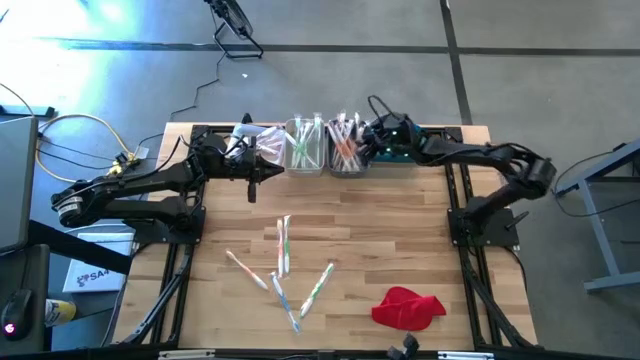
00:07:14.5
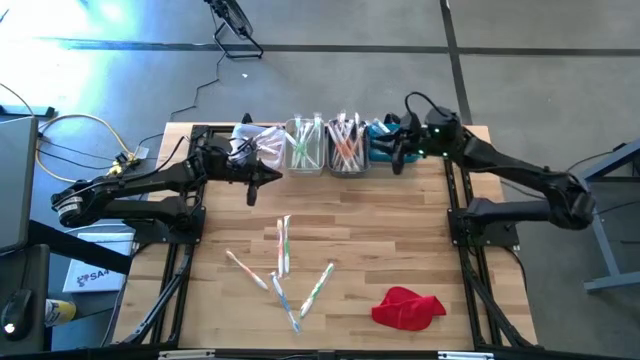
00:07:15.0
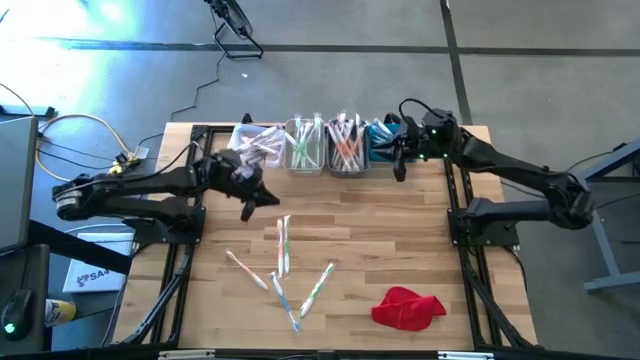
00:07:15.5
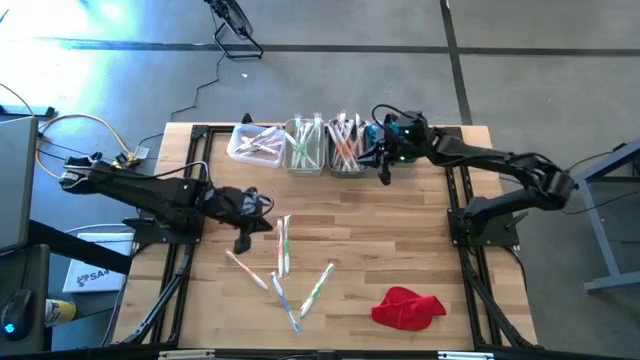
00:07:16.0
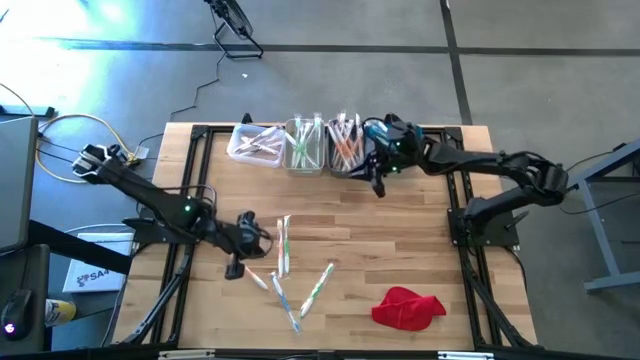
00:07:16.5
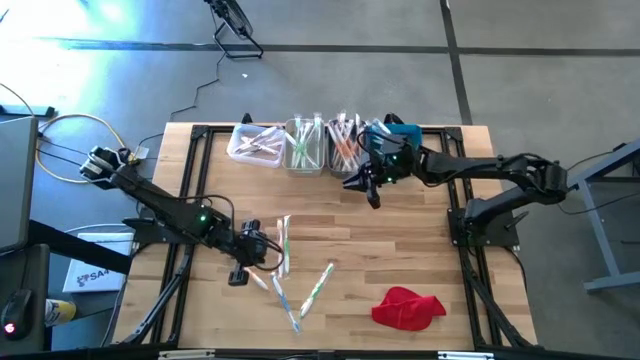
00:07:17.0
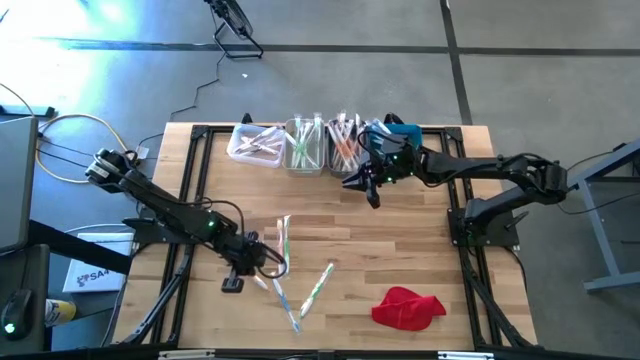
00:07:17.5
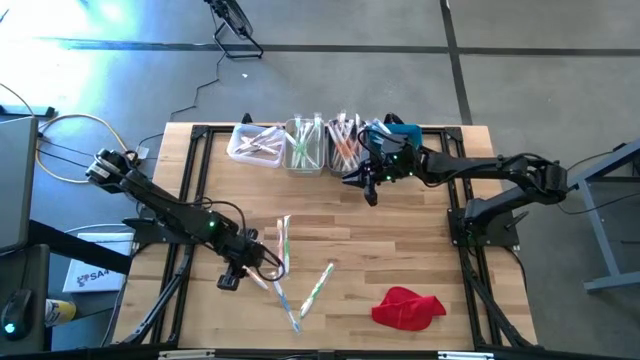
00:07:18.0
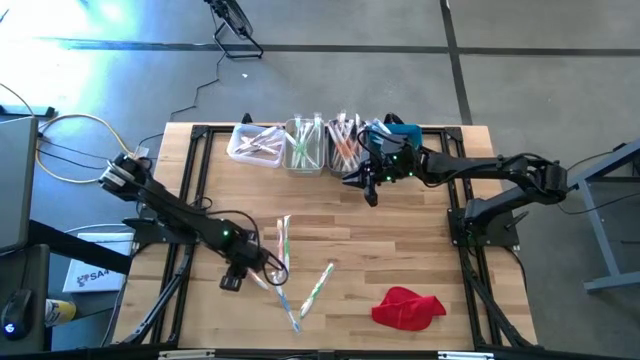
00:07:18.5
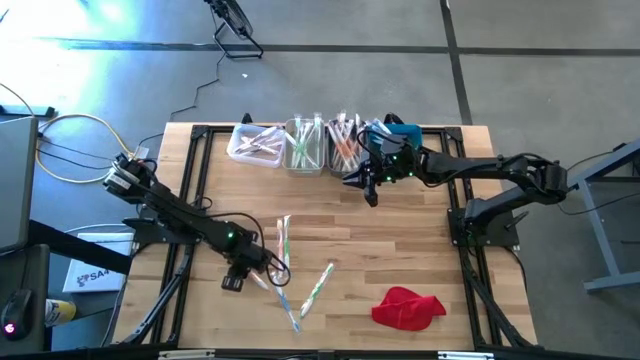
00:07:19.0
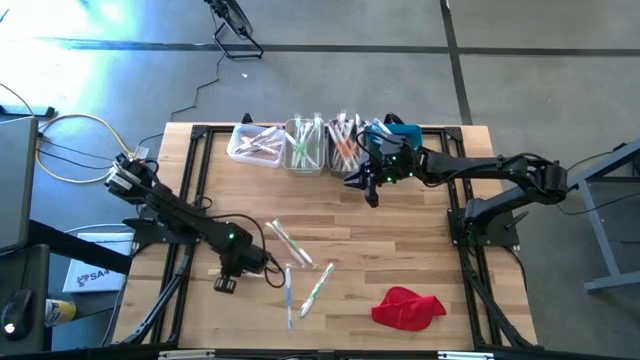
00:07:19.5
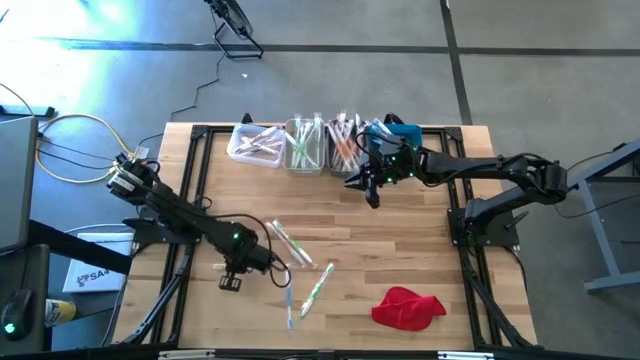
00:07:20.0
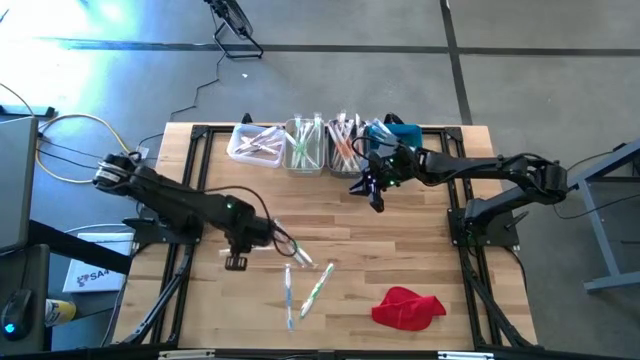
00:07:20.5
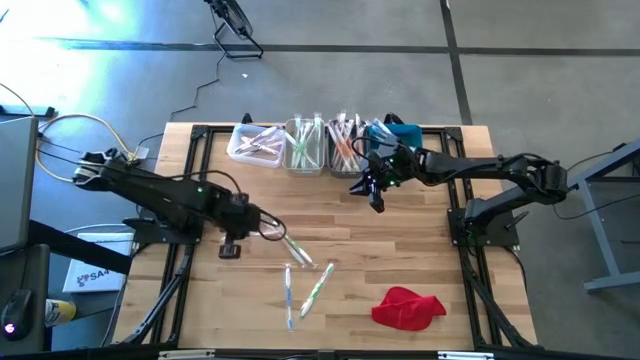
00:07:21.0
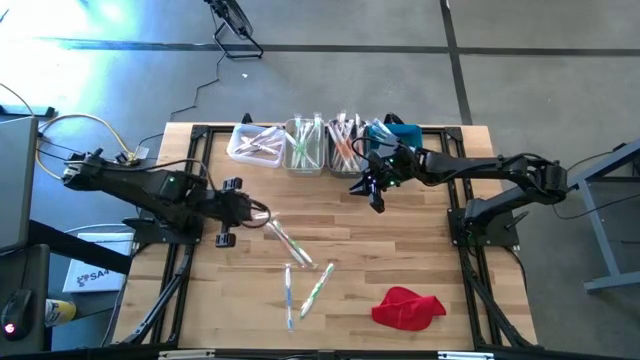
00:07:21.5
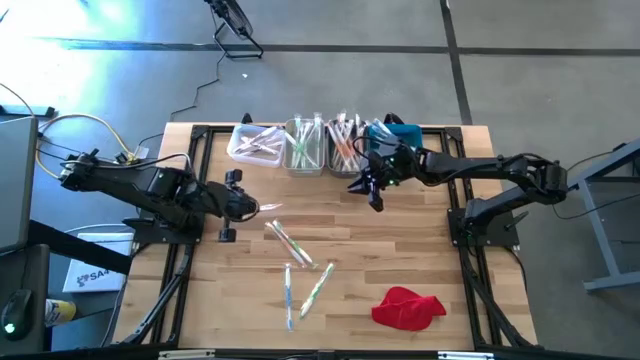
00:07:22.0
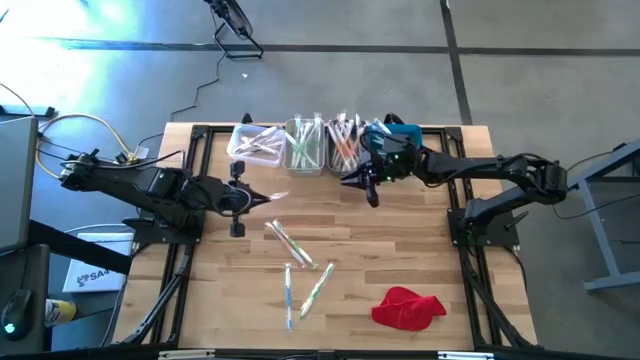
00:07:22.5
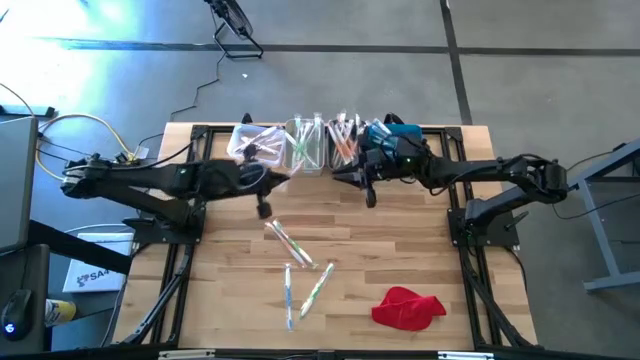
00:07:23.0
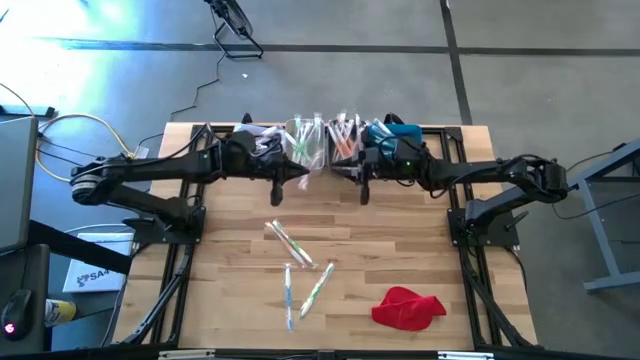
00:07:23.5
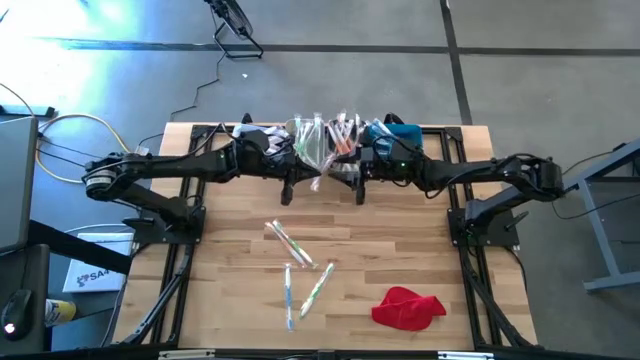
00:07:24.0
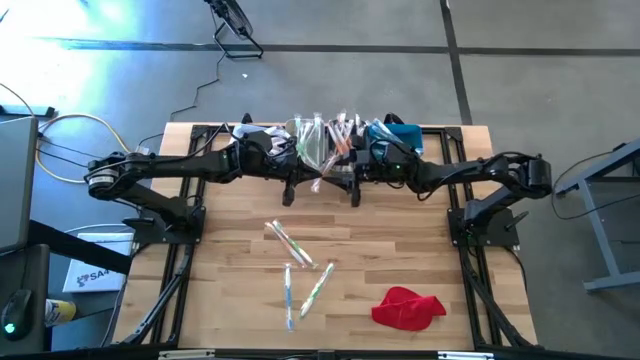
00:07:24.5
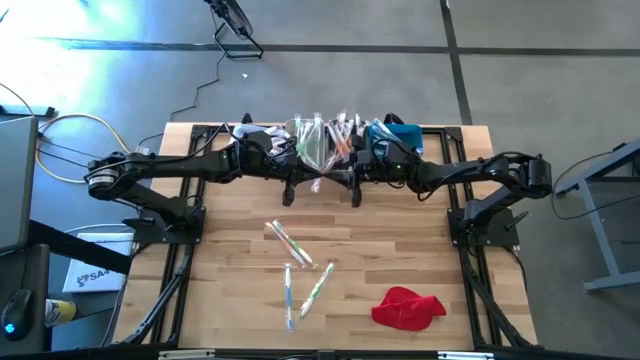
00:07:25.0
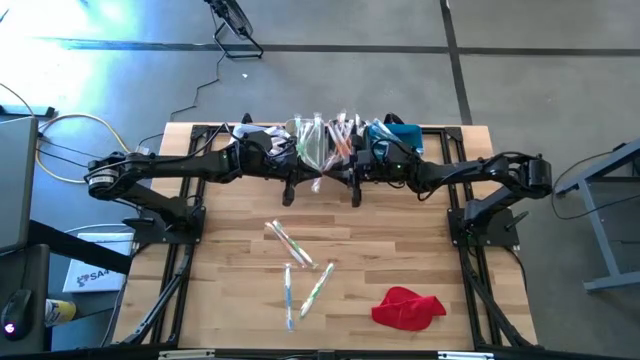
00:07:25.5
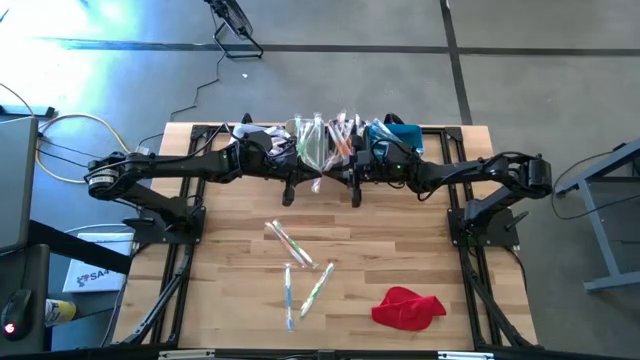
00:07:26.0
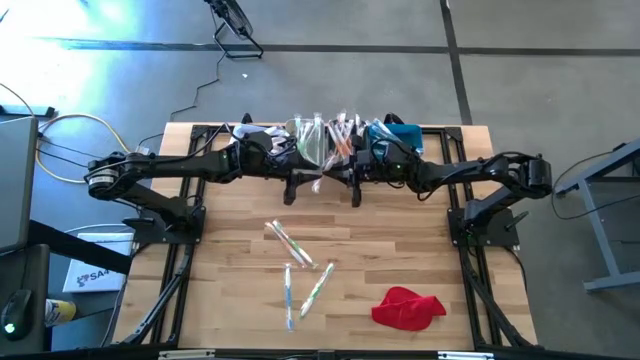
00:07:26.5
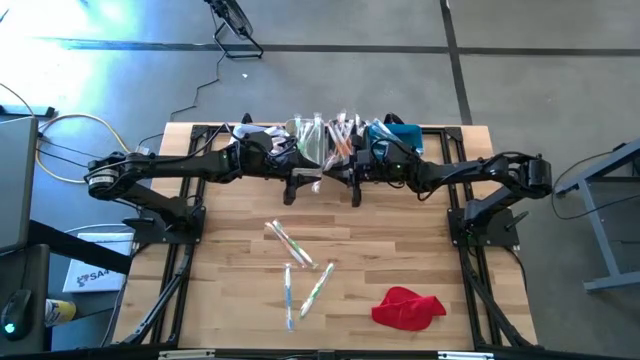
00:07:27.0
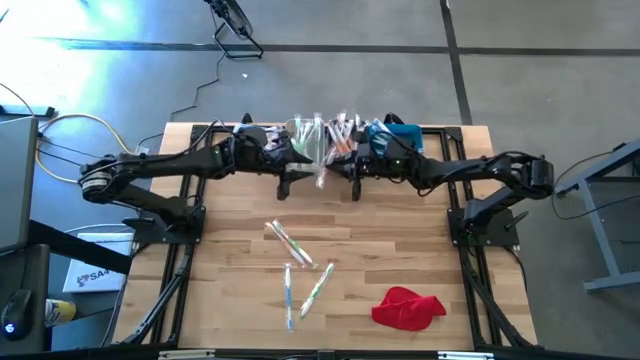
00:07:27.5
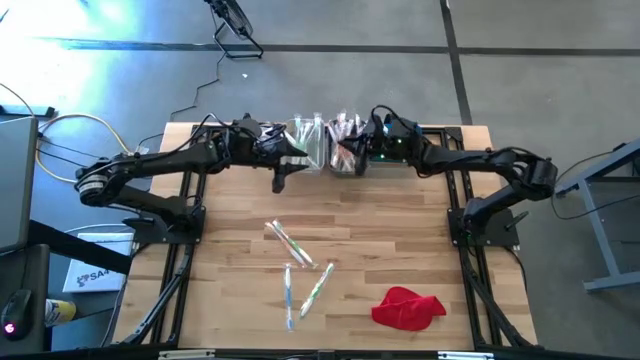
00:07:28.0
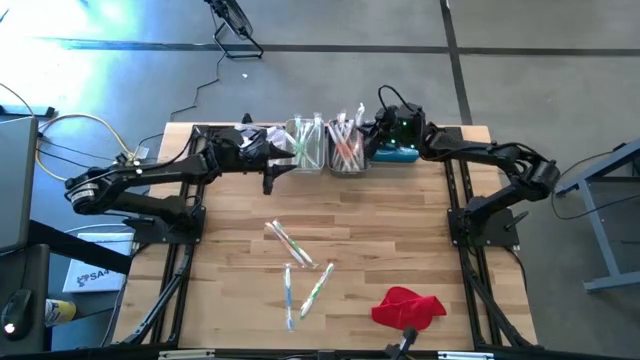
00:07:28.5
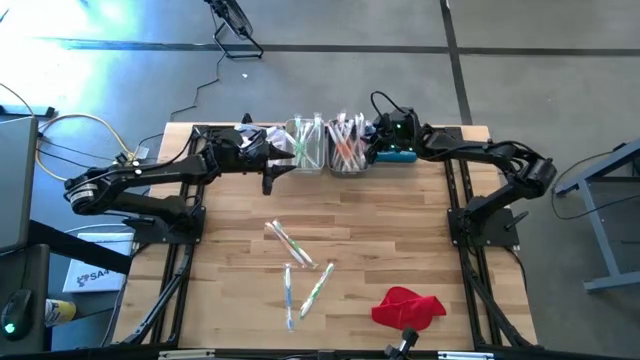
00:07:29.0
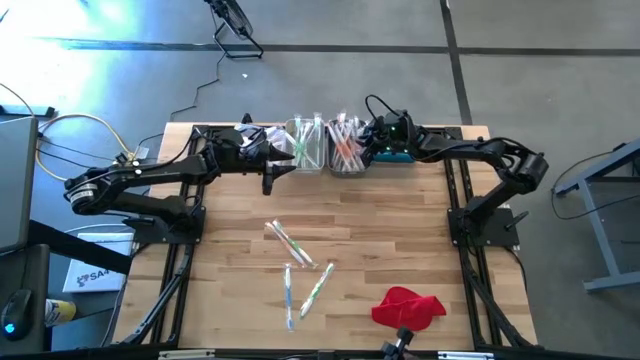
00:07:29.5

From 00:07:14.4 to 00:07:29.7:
Task: Pick & Place Toothbrushes
Put the orange toothbrush into the dark green bin

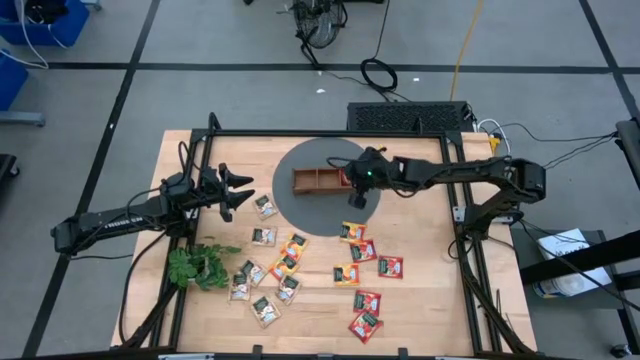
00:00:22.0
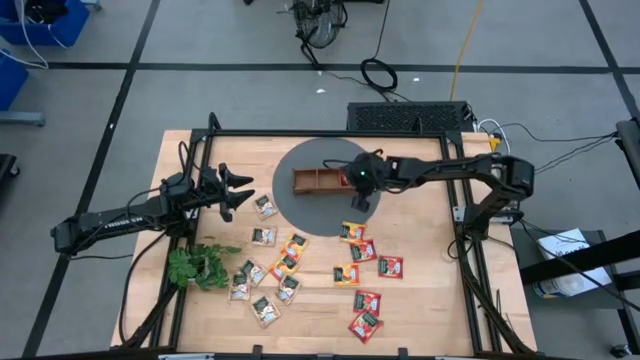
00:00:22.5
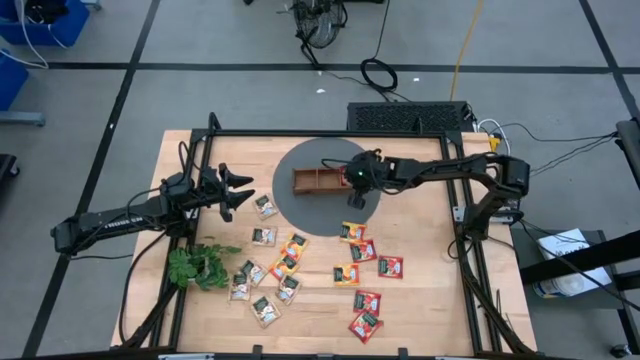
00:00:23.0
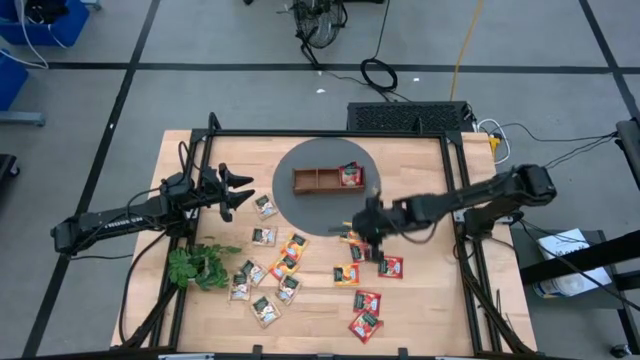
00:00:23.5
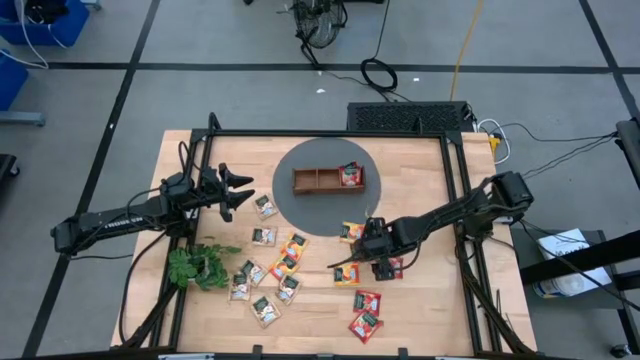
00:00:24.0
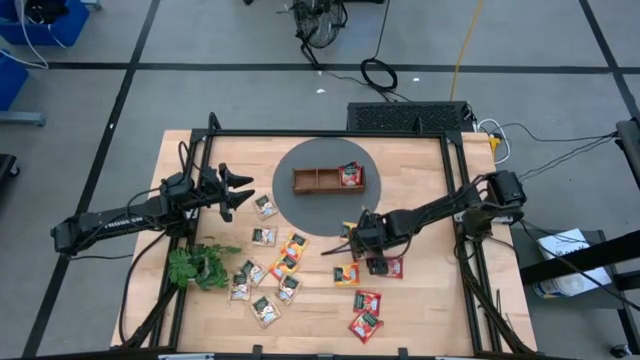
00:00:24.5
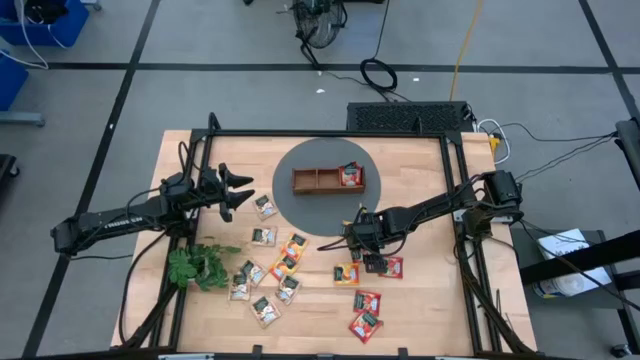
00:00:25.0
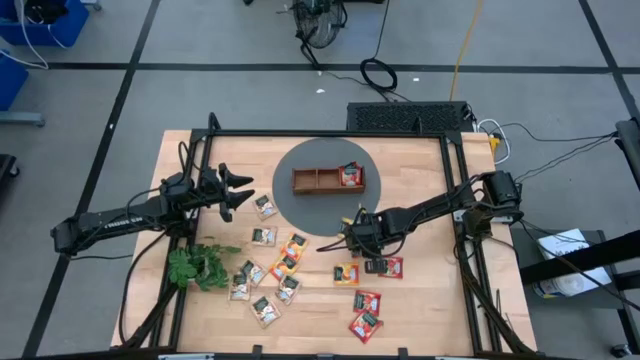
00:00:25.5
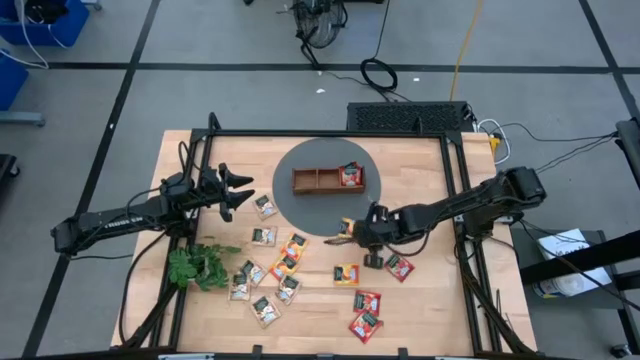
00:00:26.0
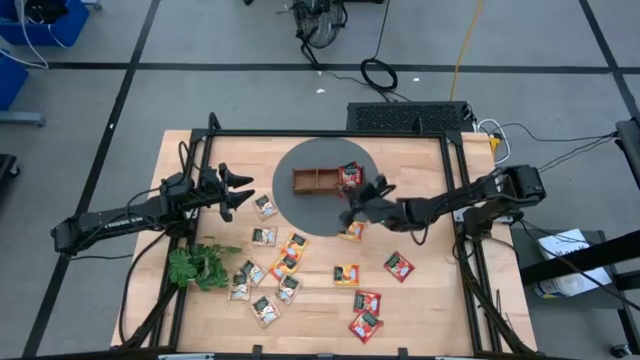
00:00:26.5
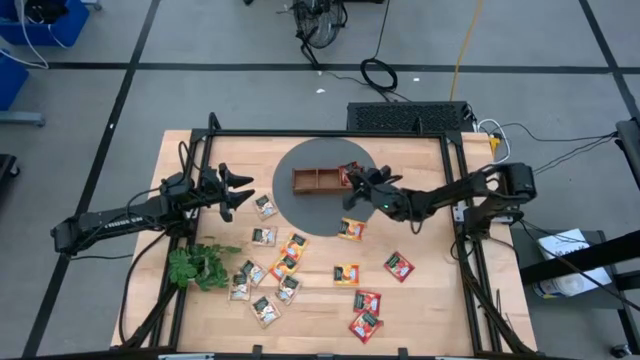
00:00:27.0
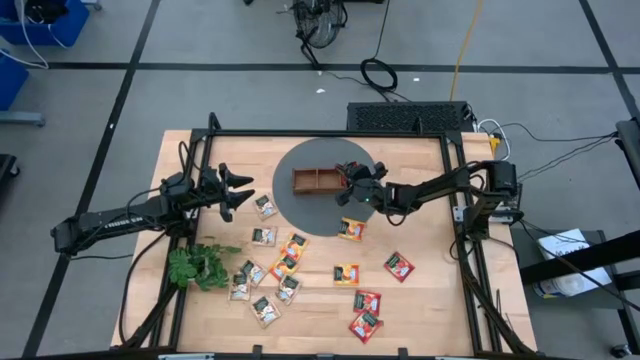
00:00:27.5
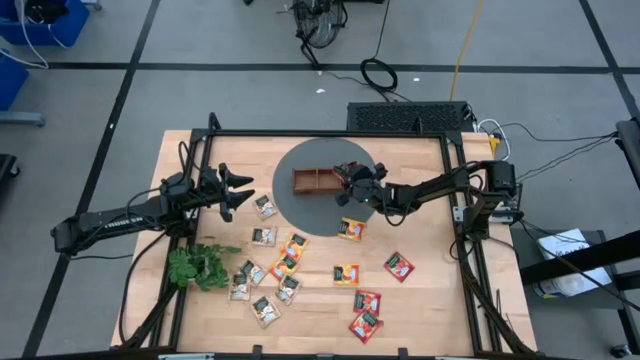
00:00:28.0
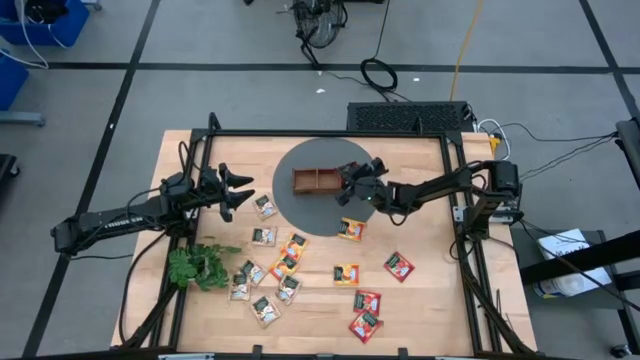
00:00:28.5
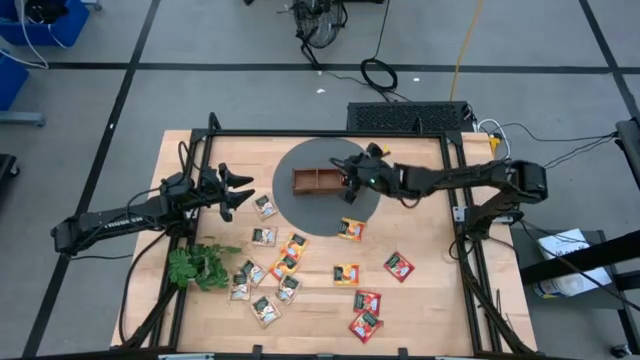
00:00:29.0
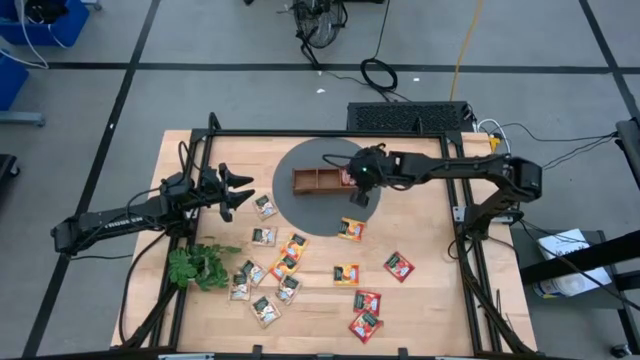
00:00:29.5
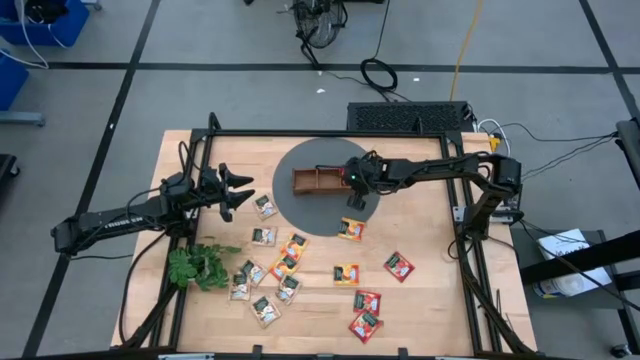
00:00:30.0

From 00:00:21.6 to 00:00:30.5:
Task: Pick & Place Tea
Put the red tea bag into the right section of the wooden organizer
